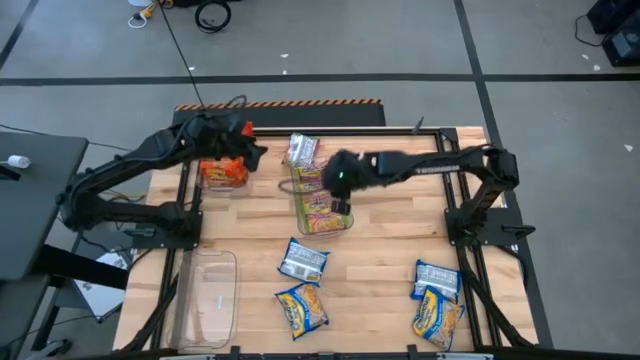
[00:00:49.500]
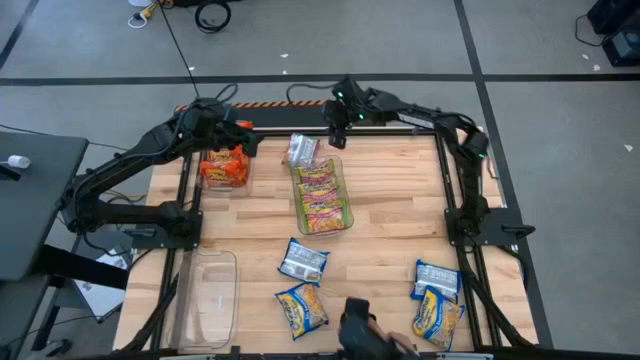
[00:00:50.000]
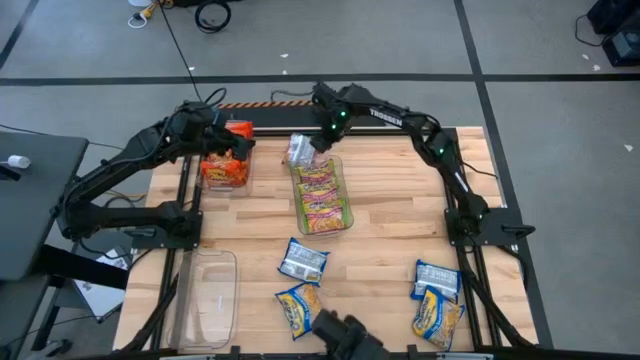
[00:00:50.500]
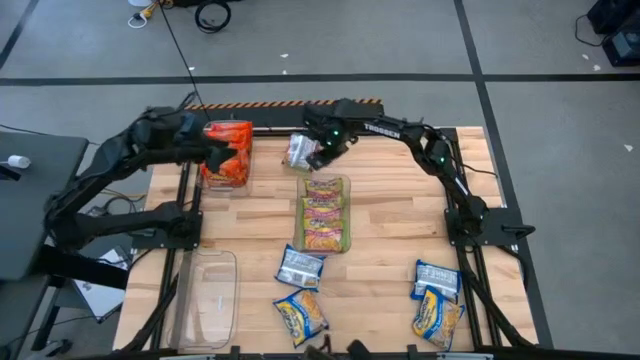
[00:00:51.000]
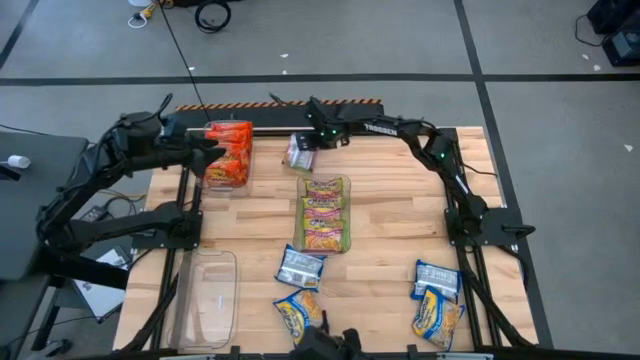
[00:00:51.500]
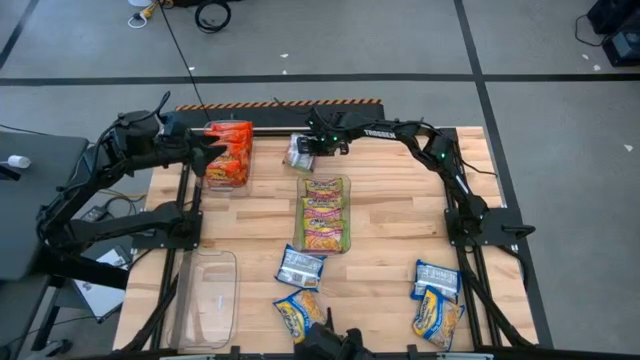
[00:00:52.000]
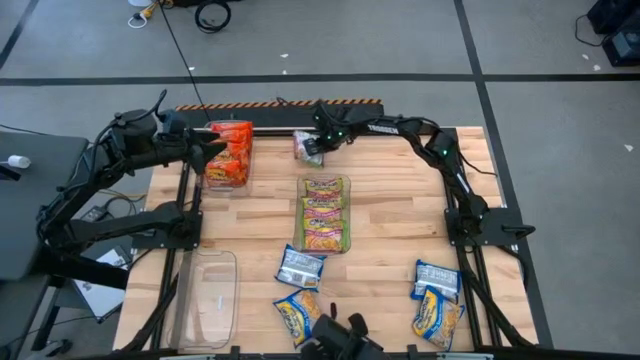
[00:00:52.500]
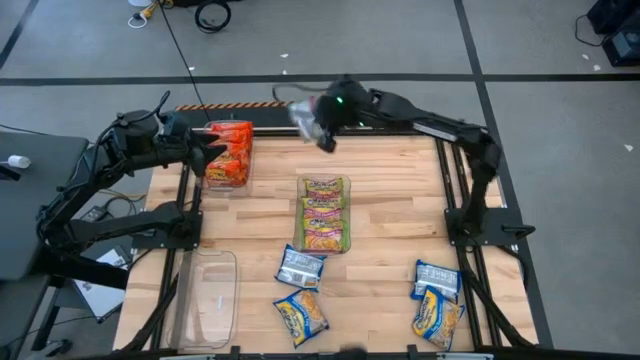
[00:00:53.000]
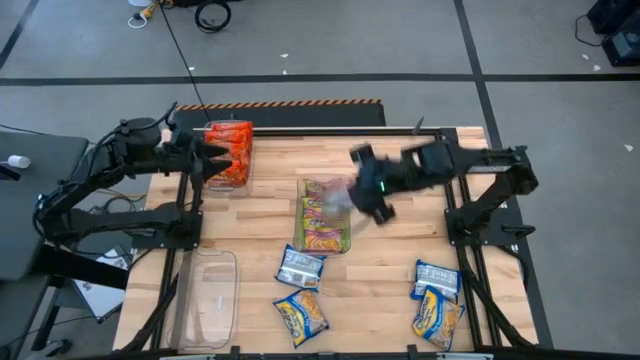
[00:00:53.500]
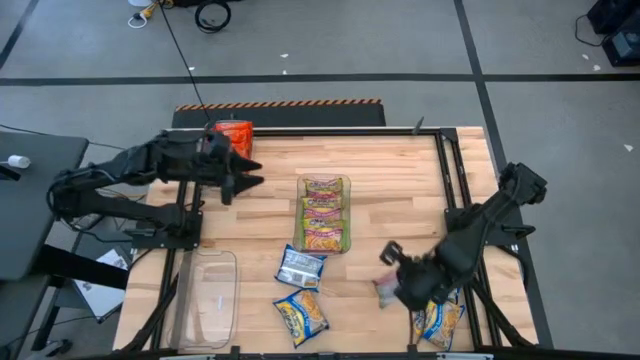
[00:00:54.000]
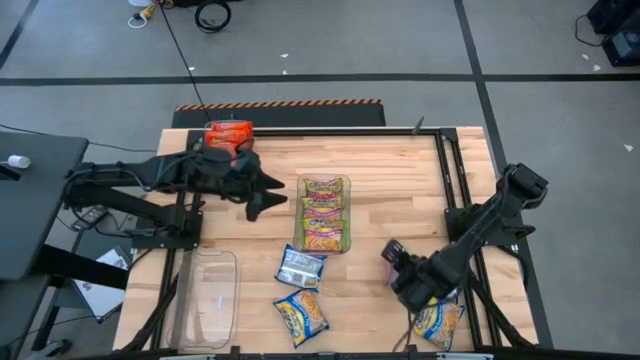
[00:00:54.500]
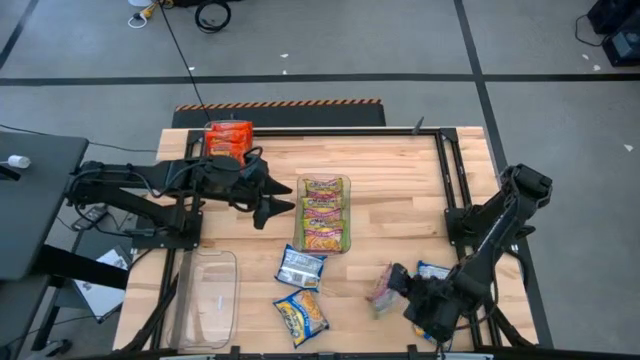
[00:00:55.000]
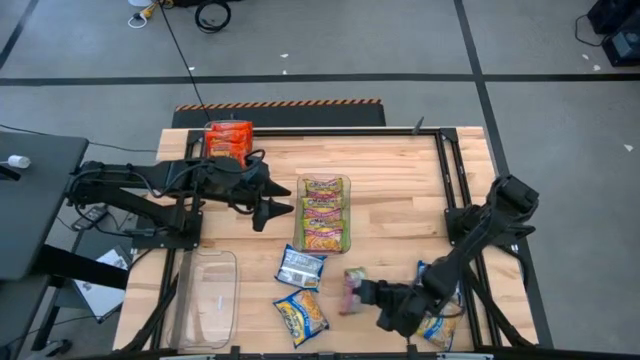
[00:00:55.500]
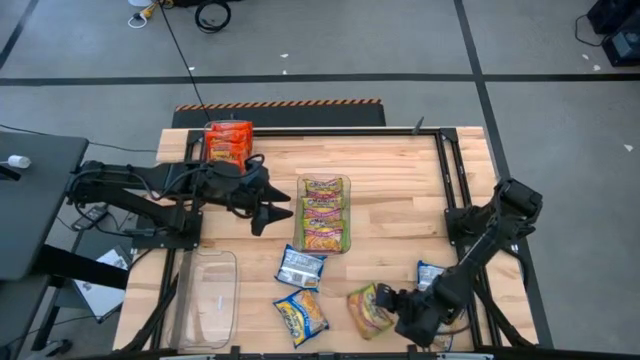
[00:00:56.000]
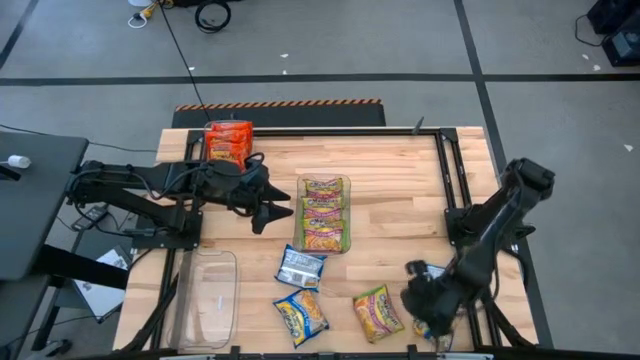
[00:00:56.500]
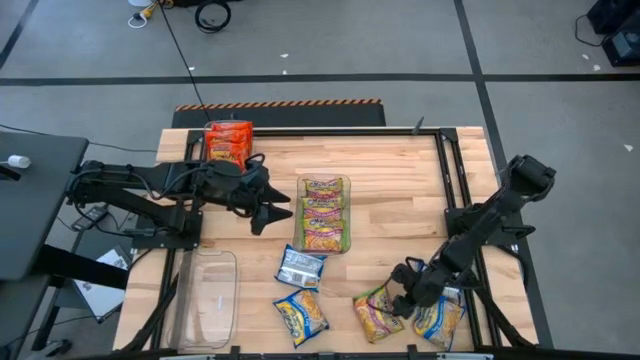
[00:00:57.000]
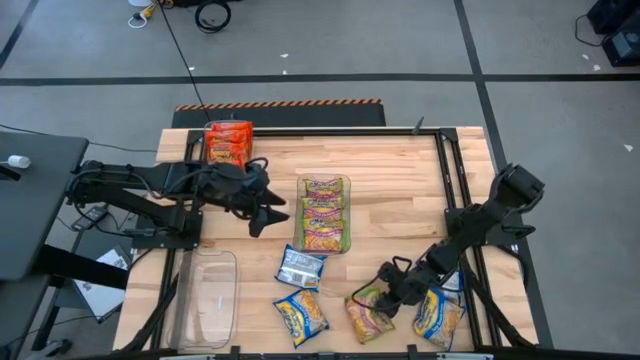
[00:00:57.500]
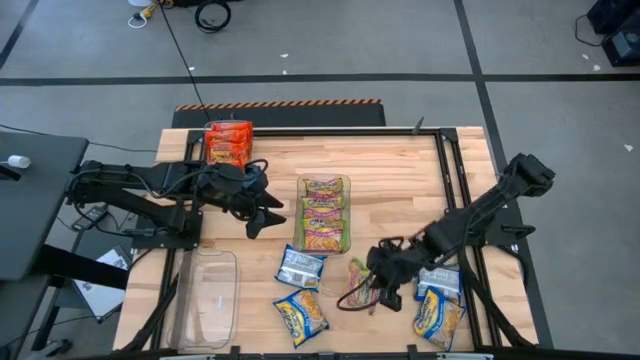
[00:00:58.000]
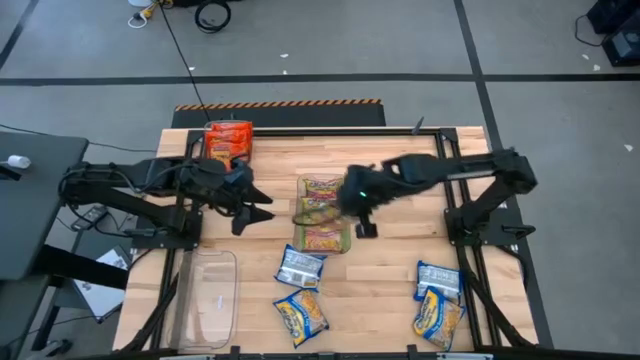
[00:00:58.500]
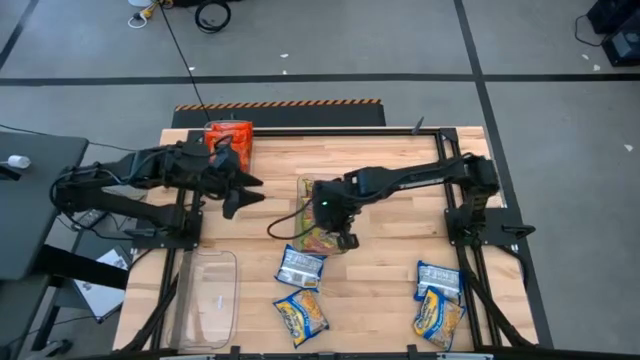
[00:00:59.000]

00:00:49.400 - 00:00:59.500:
Task: Sort Maruchan noodles
Put the green noodle pack into the center transparent bin

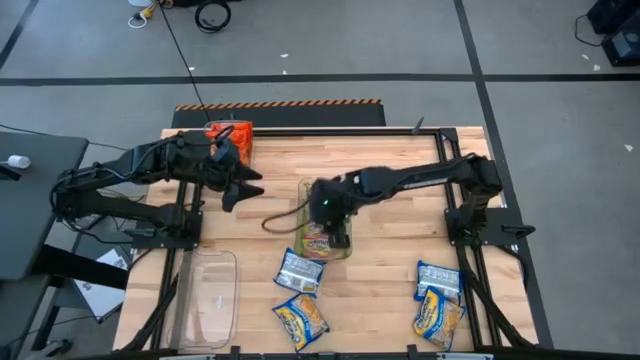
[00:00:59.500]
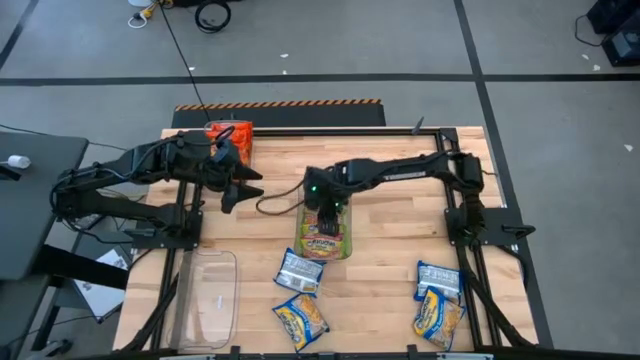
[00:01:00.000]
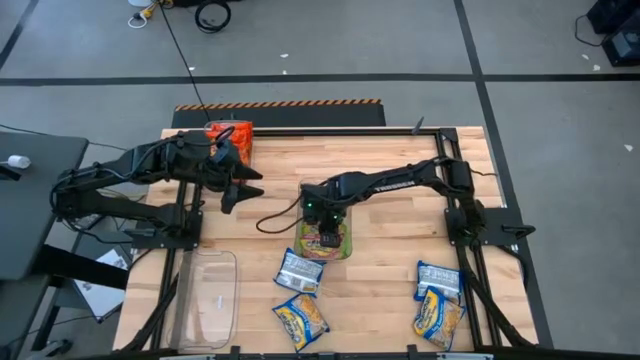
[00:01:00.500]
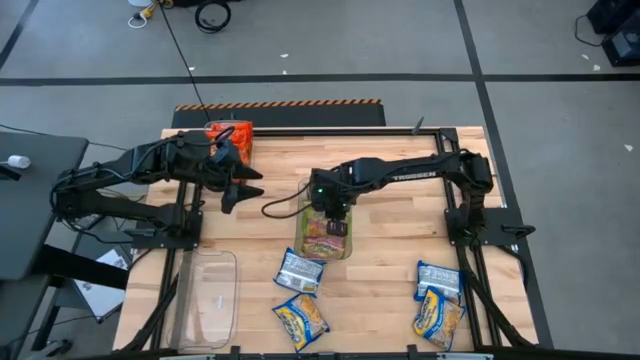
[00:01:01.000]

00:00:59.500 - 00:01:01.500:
Adjust the green noodle pack

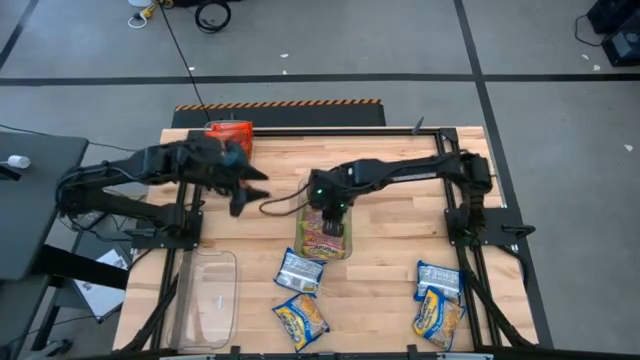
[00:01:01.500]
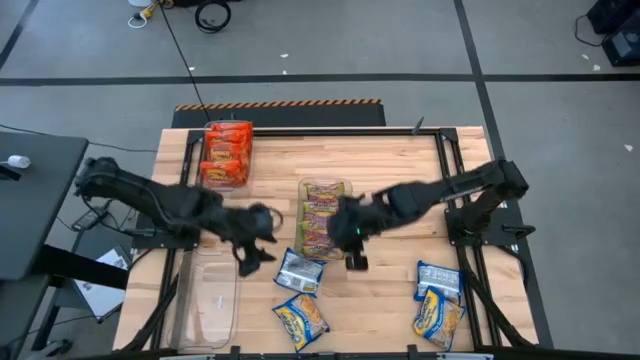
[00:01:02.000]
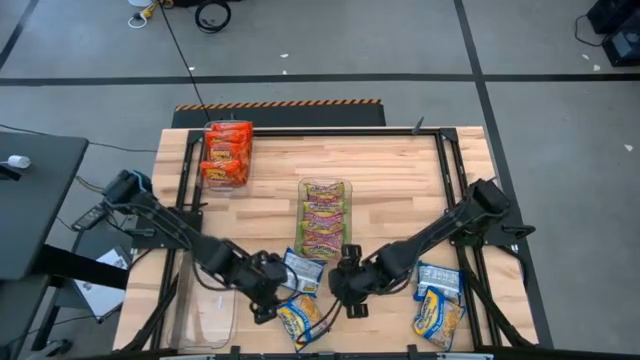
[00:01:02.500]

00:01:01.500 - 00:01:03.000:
Adjust the center transparent bin to the center of the table

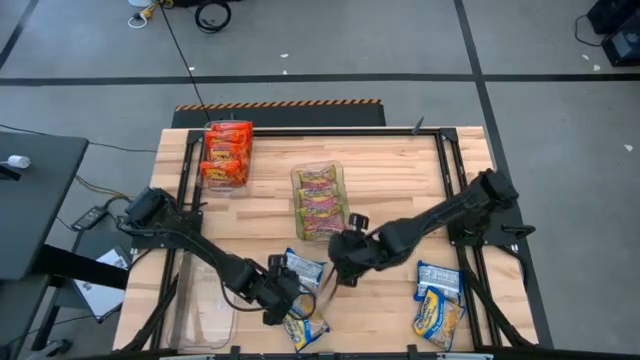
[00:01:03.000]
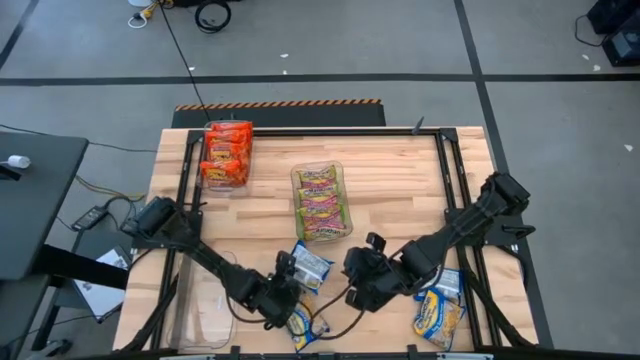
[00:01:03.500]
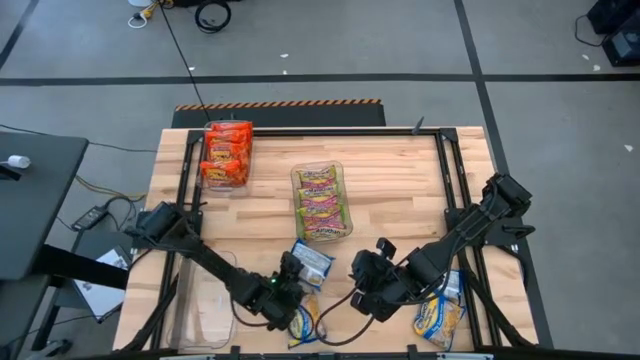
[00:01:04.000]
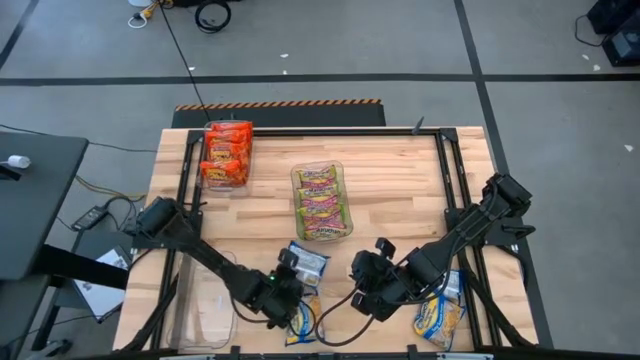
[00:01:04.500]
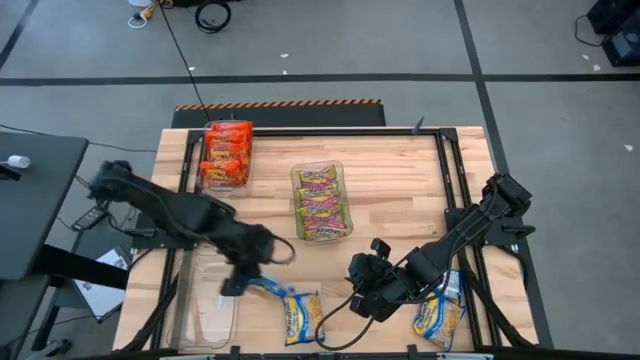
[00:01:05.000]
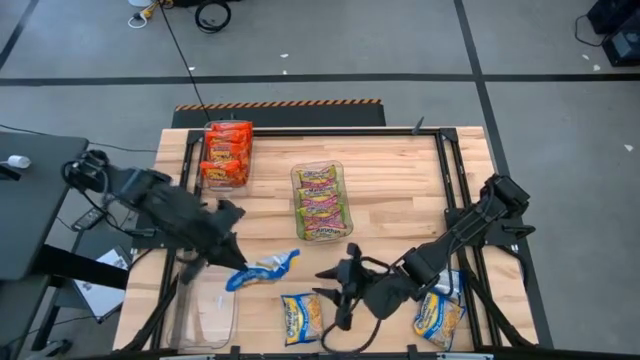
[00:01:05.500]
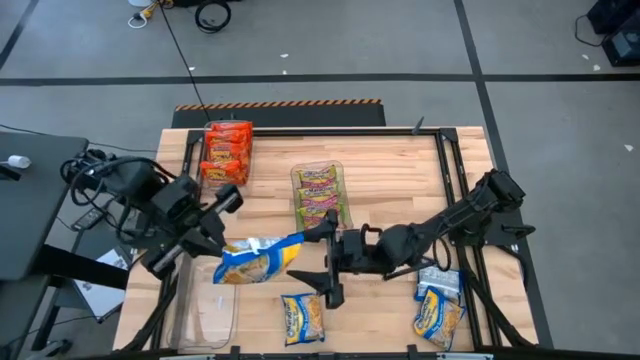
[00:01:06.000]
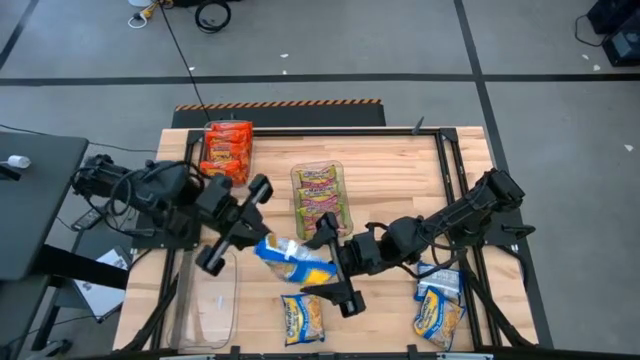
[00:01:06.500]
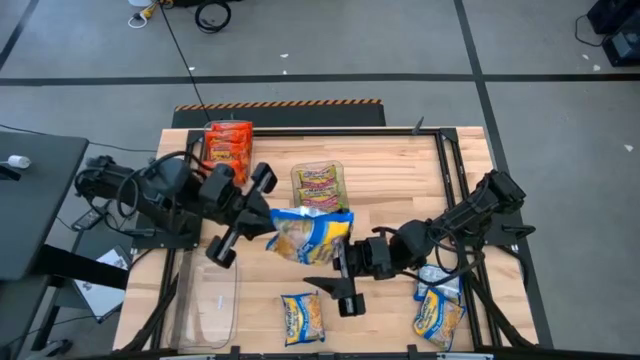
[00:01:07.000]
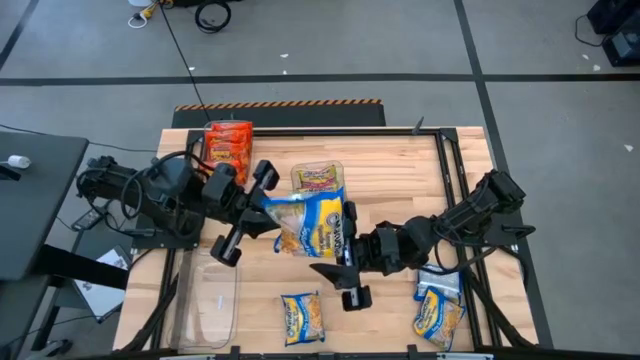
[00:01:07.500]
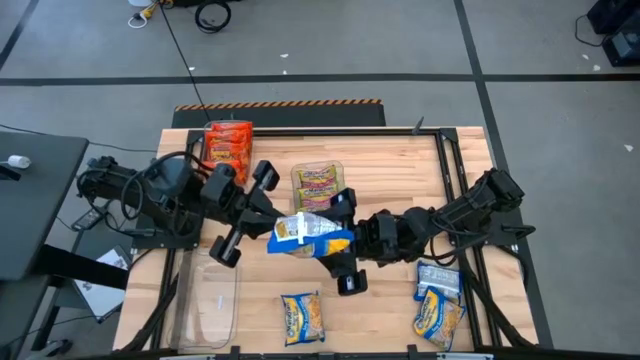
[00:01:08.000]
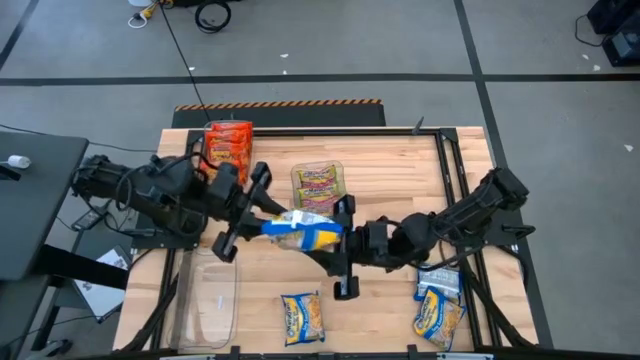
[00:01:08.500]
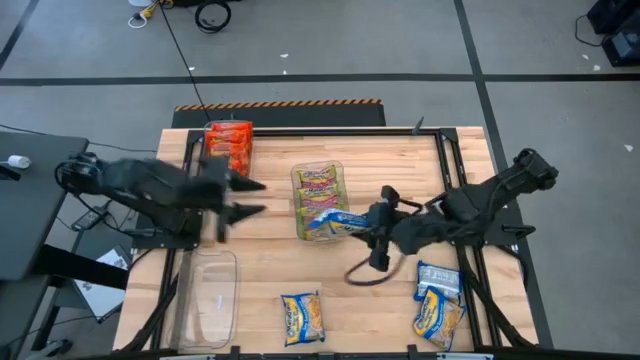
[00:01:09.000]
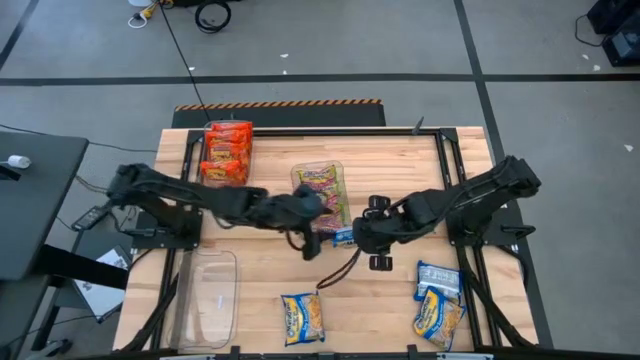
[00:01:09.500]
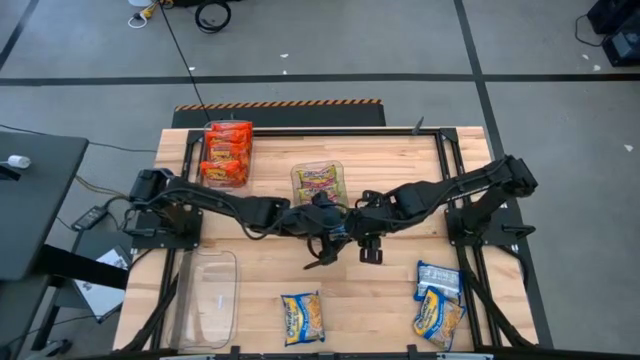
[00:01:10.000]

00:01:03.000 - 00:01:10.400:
Put the top left blue noodle pack into the bottom transparent bin
